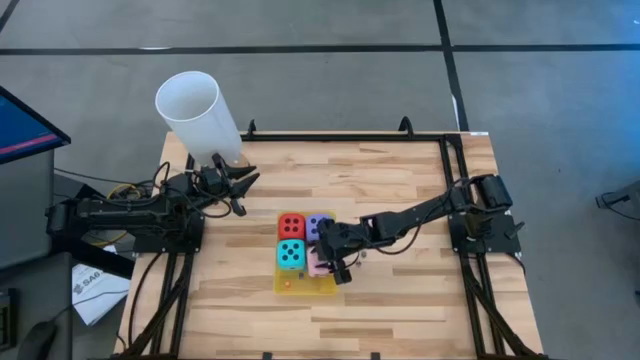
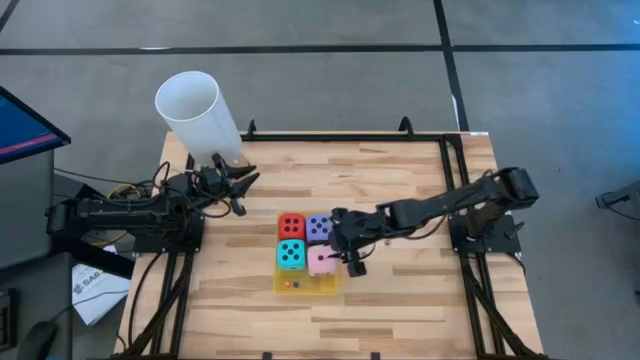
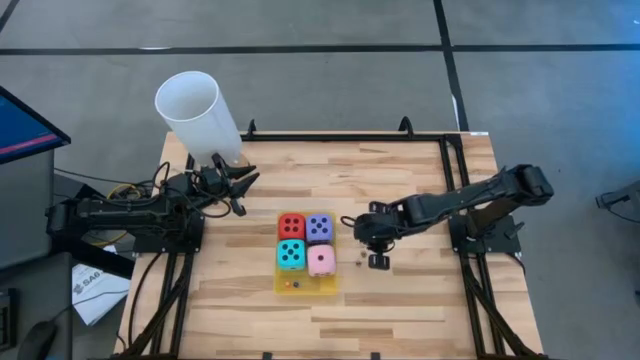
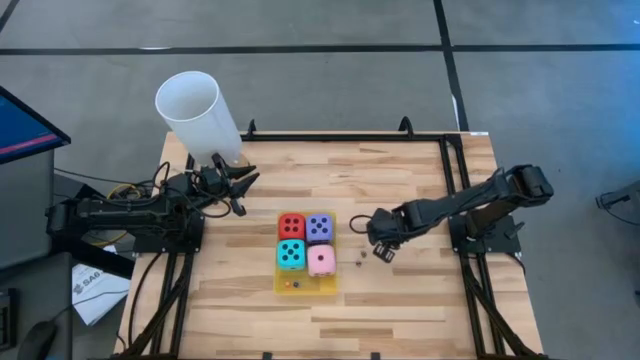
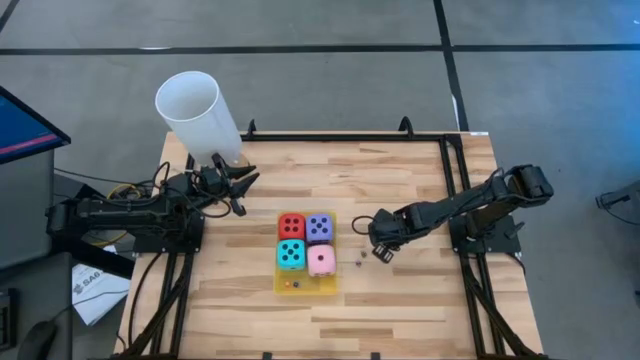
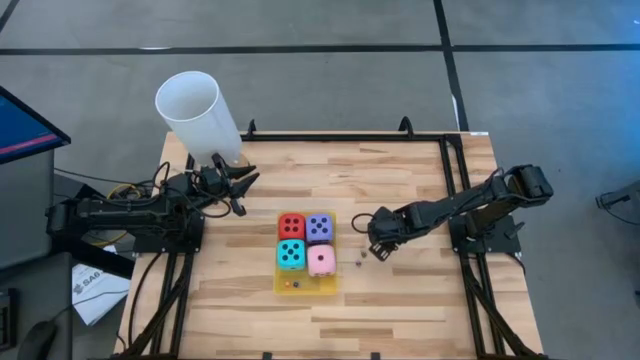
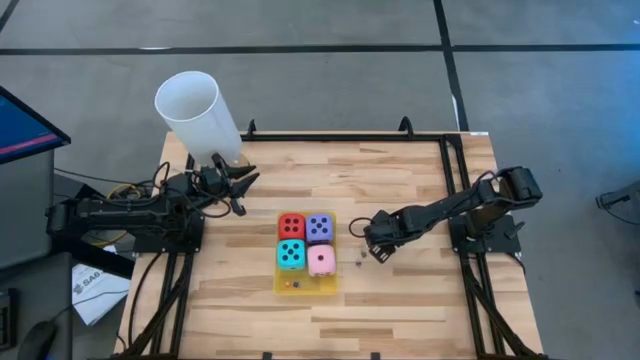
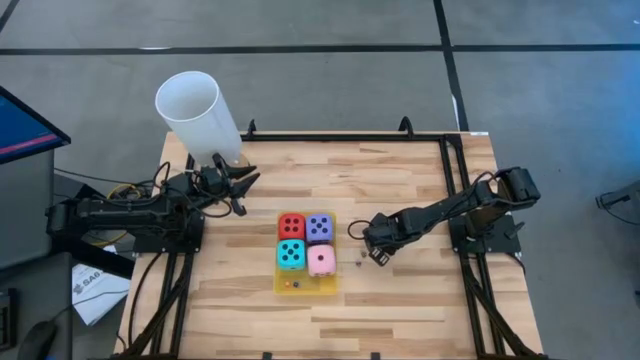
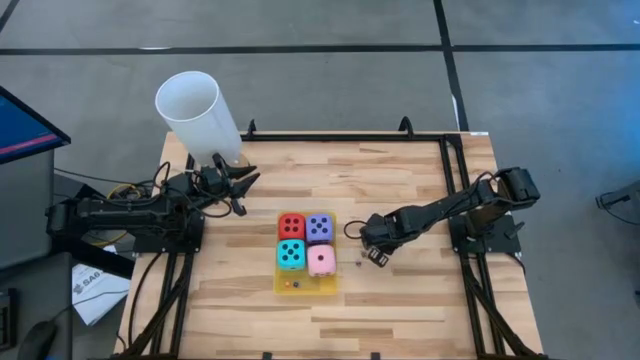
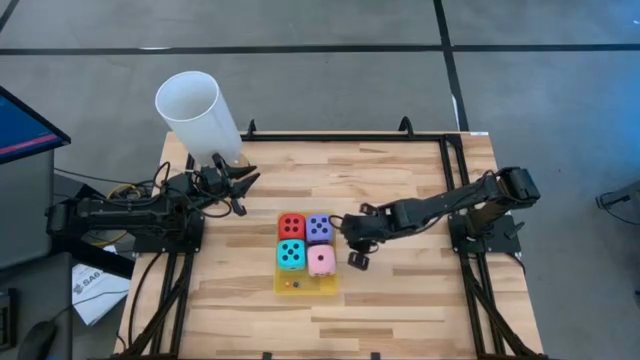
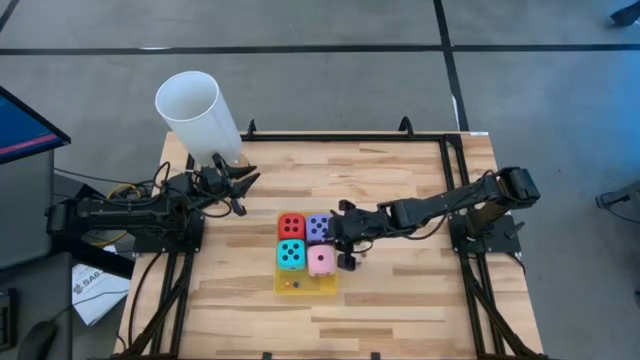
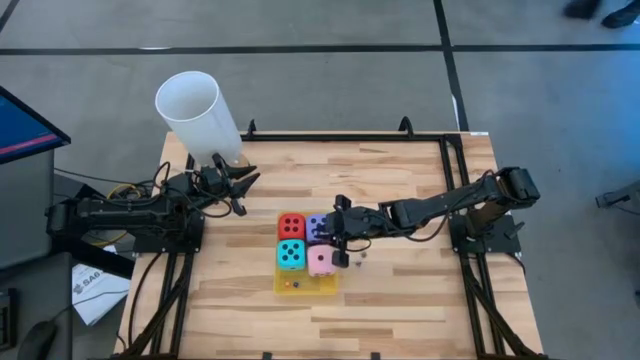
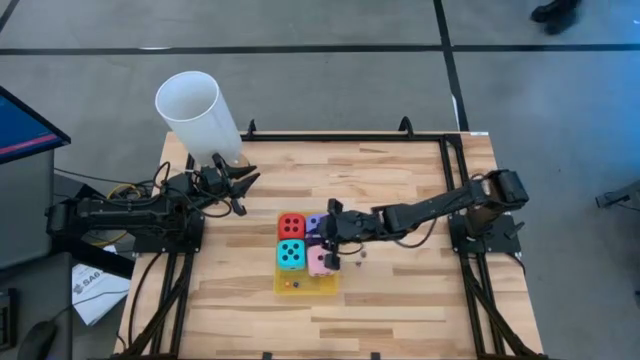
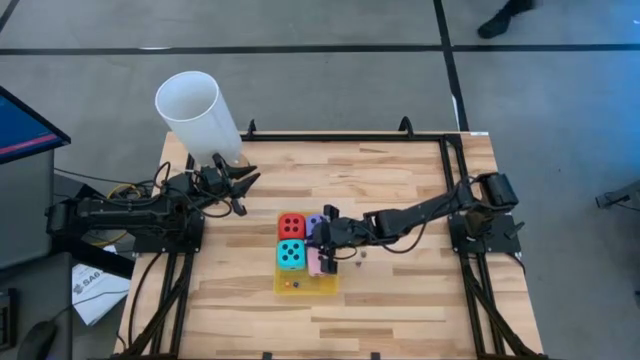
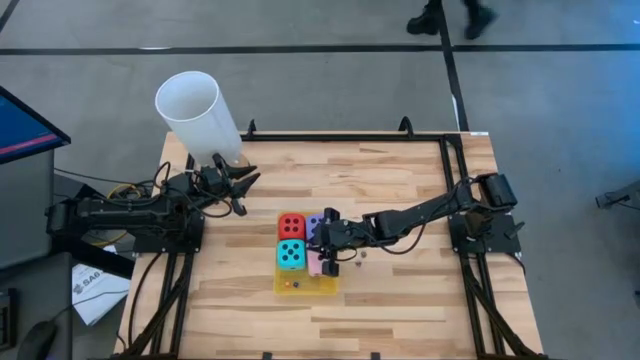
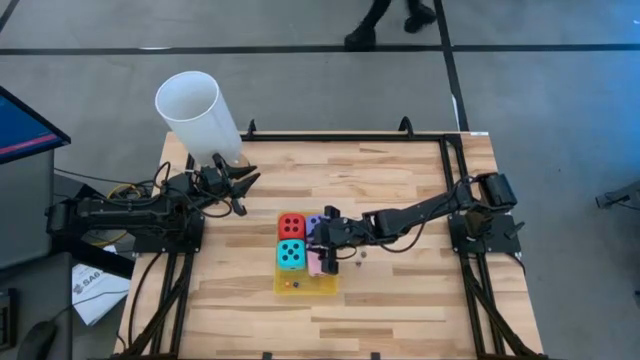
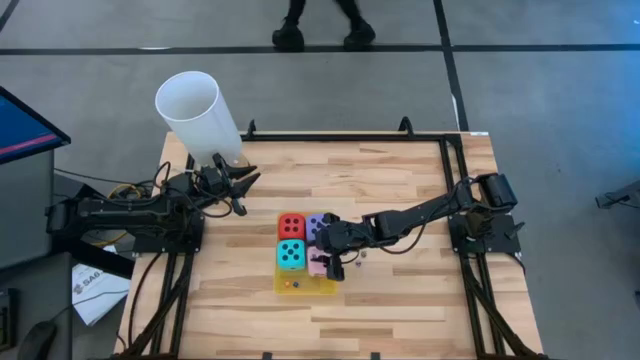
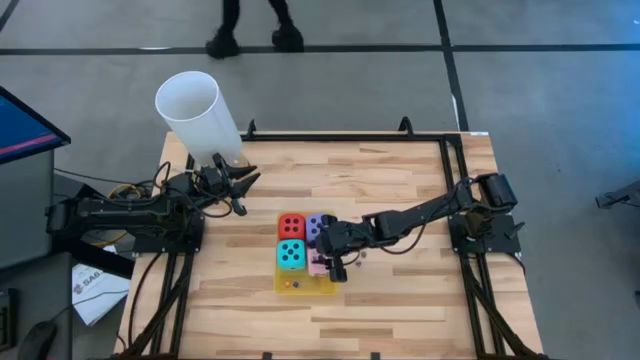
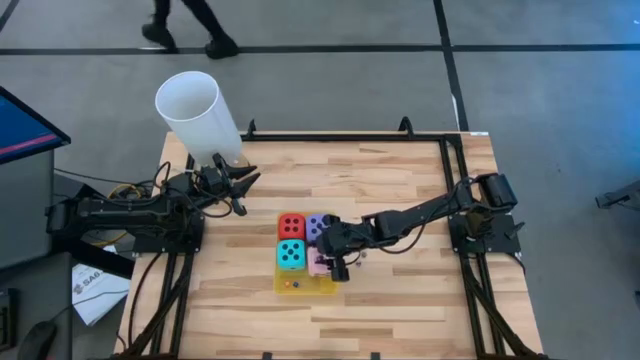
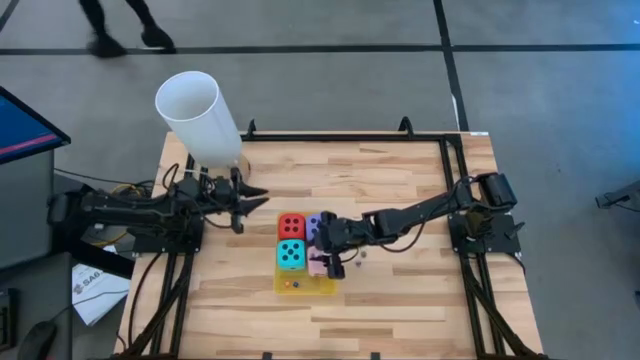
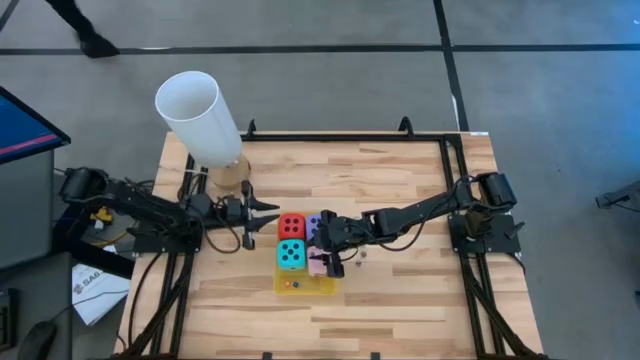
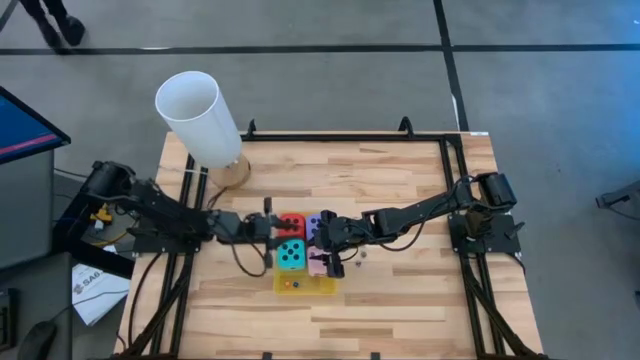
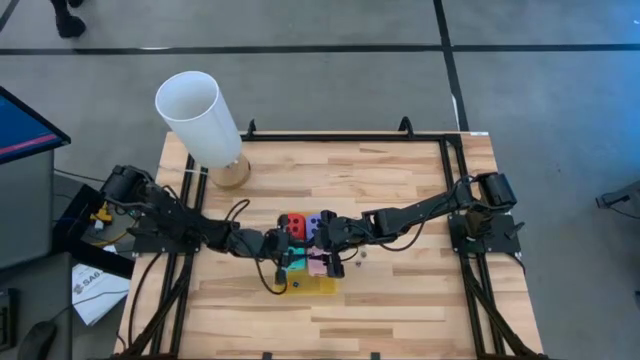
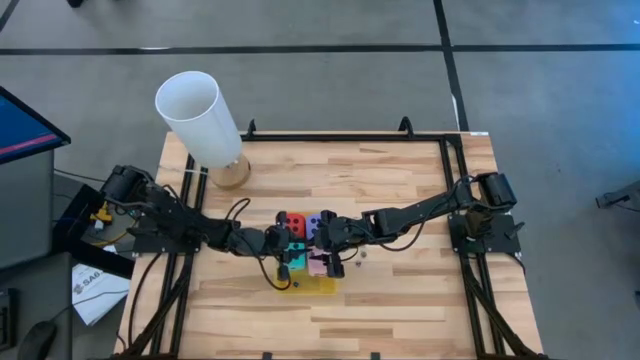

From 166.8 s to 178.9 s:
Task: Pick & Place Dice
Put the violet die into the yellow bin

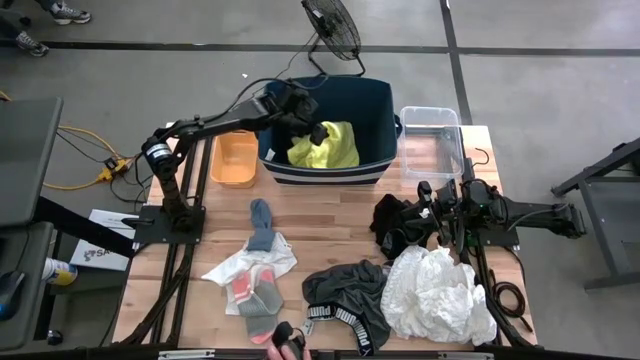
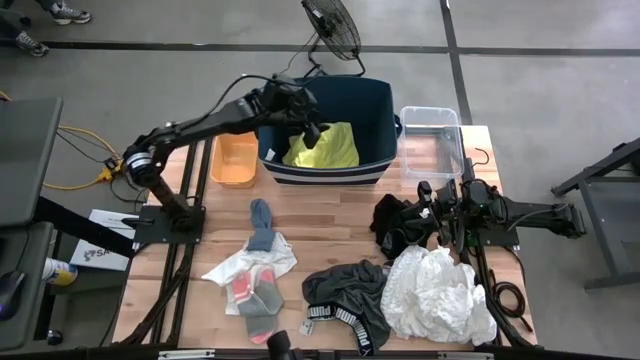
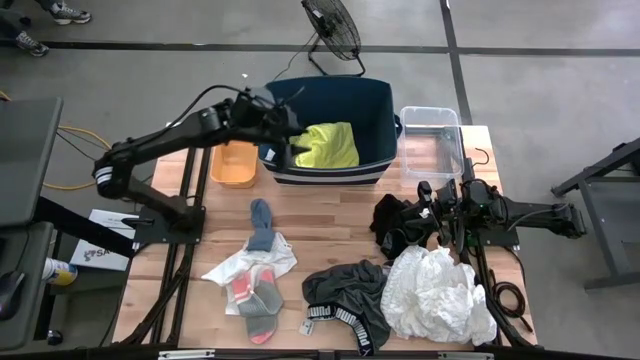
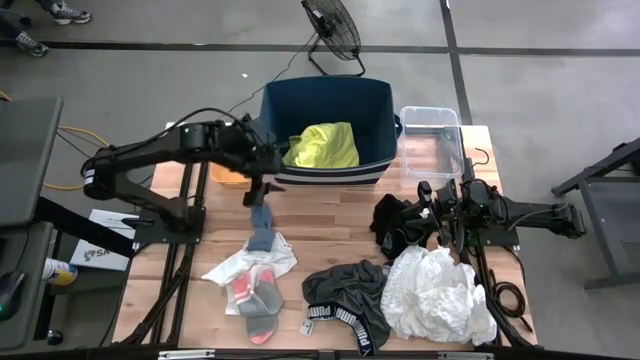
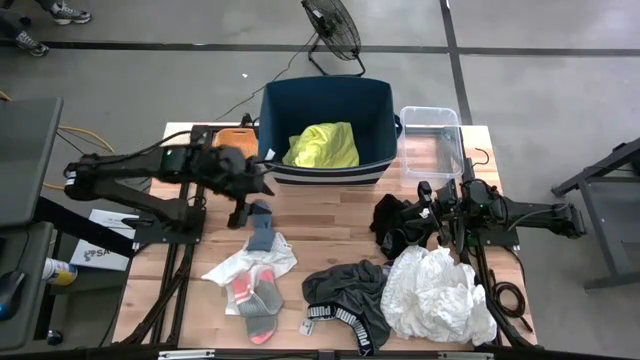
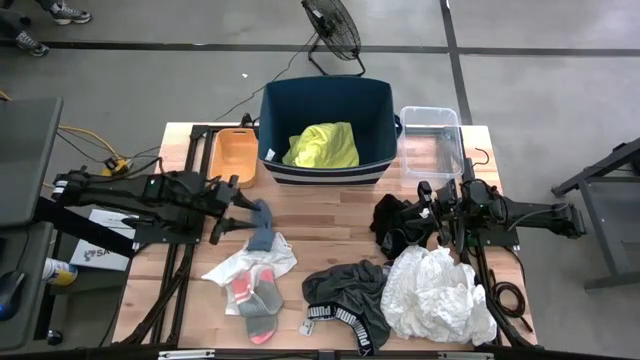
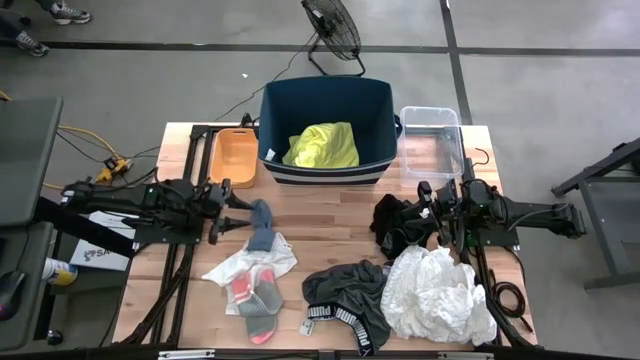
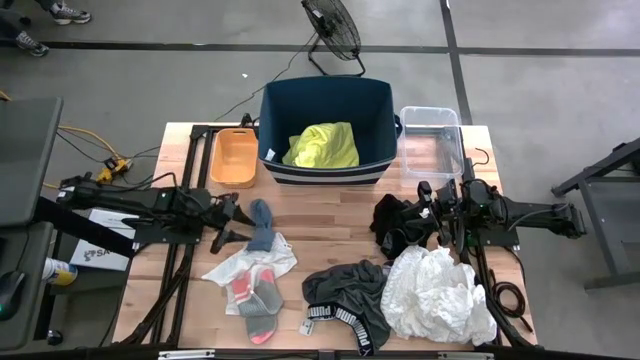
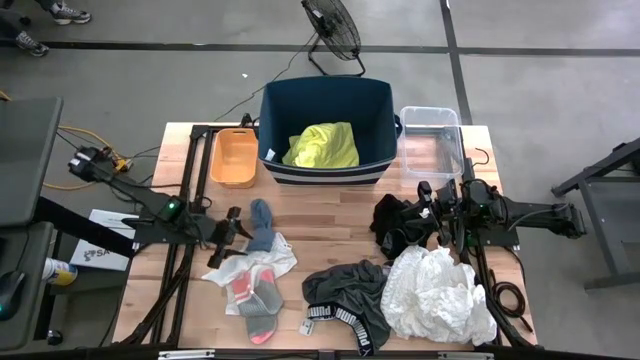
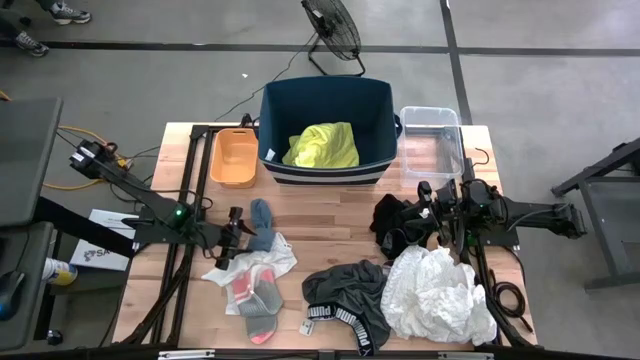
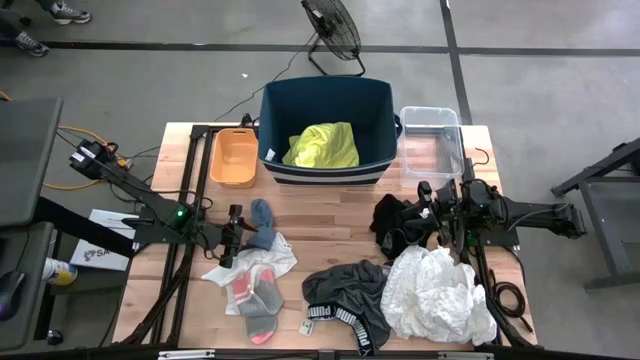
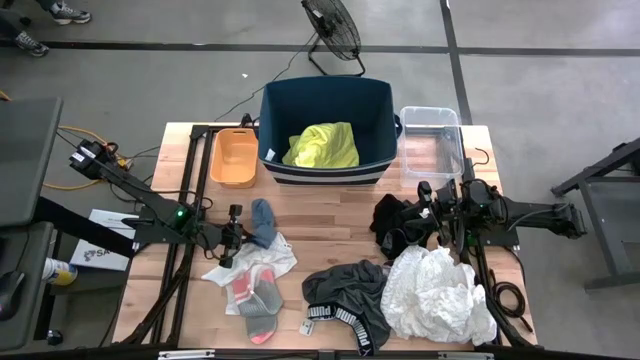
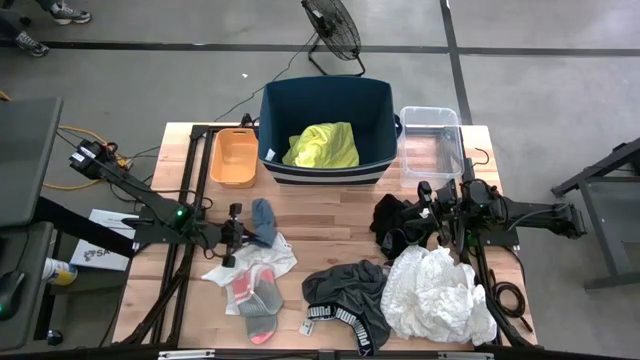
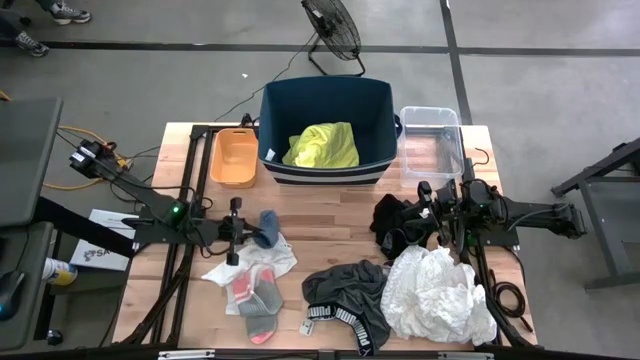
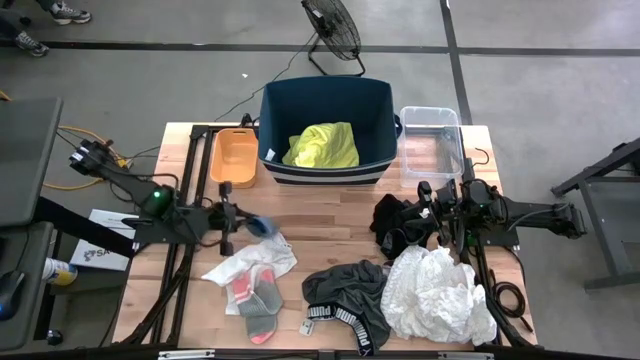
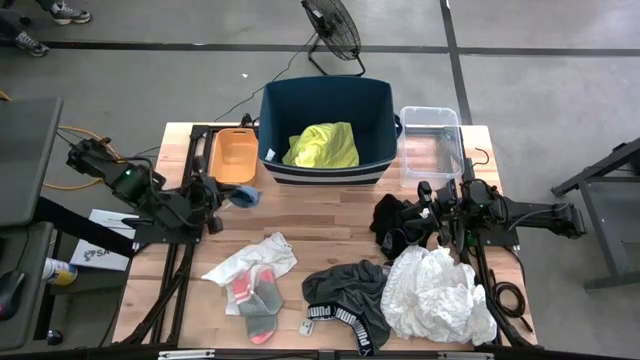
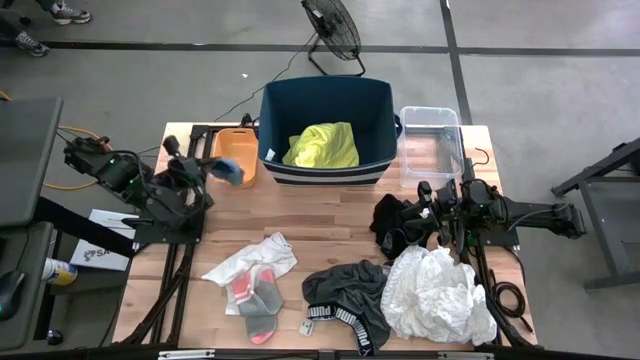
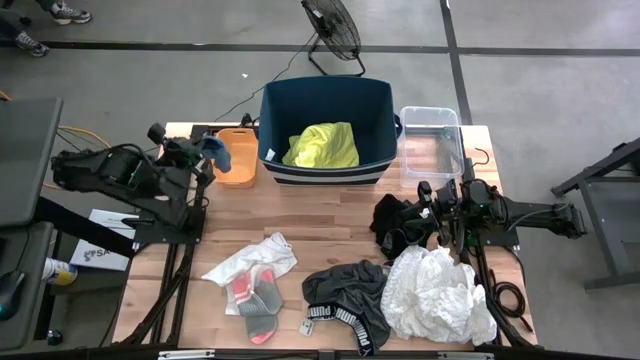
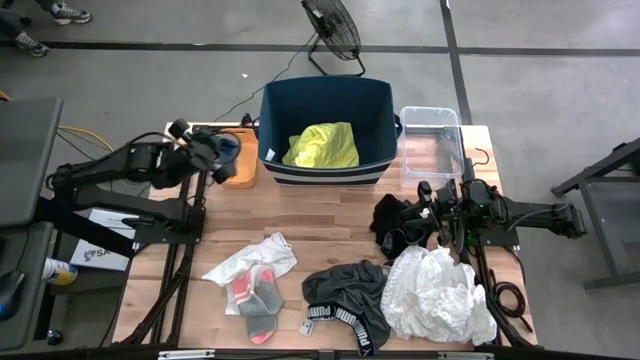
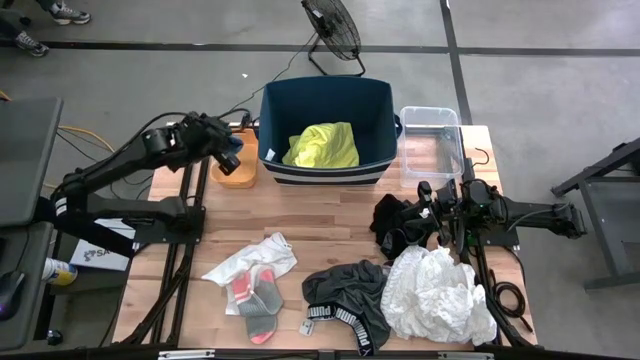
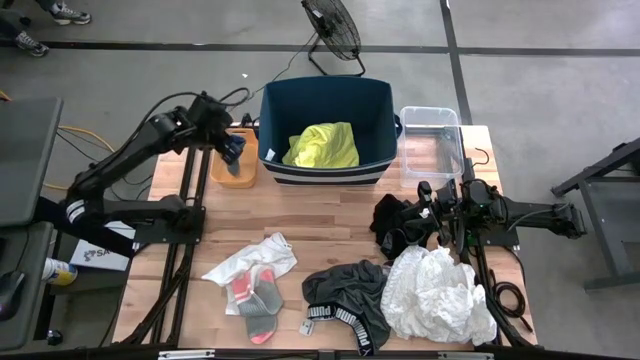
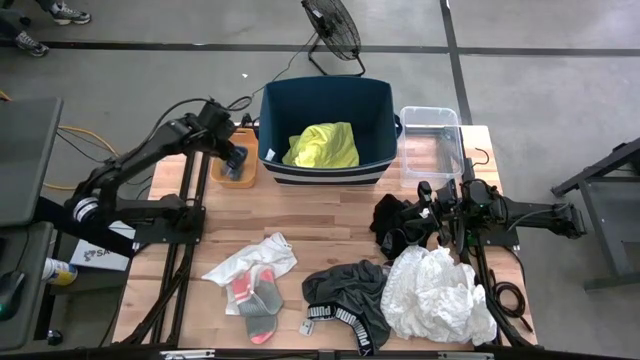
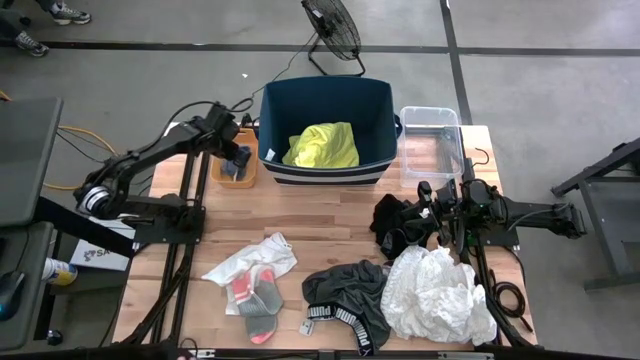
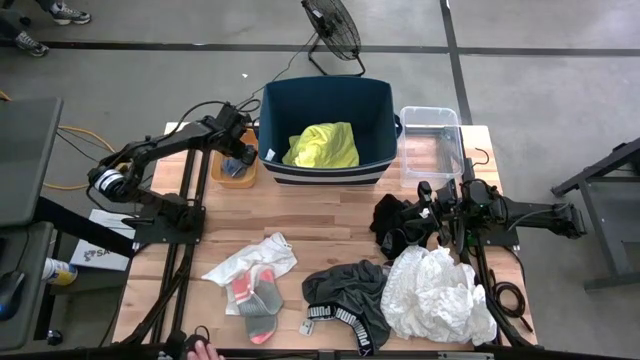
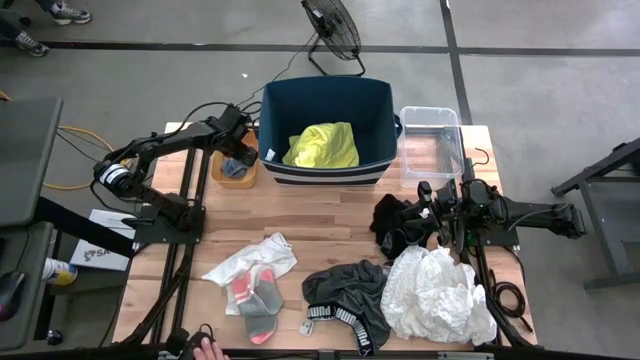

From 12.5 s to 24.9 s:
Task: Pick & Place Cloths
Put the blue sock into the yellow bin
